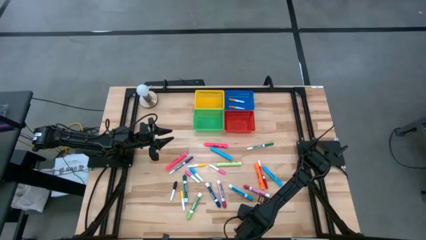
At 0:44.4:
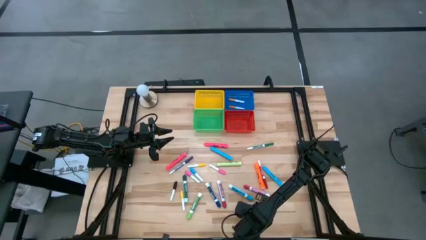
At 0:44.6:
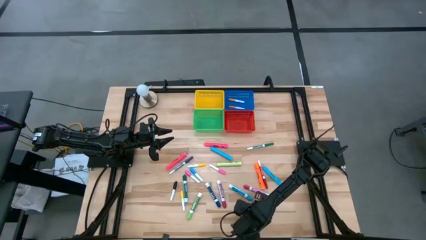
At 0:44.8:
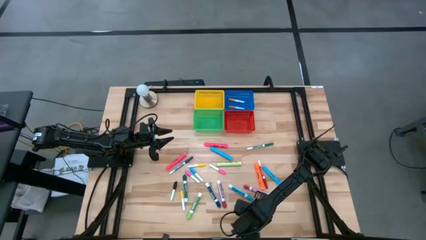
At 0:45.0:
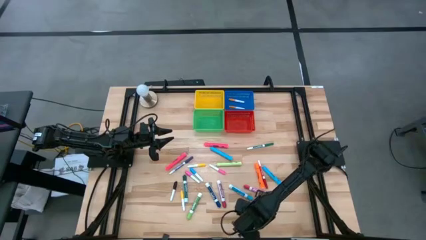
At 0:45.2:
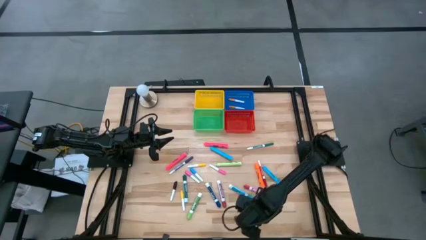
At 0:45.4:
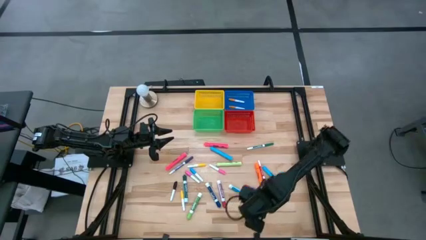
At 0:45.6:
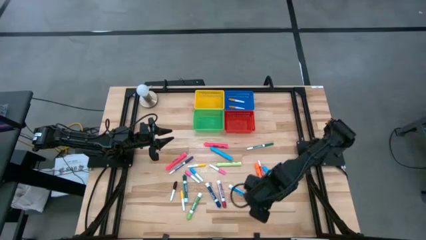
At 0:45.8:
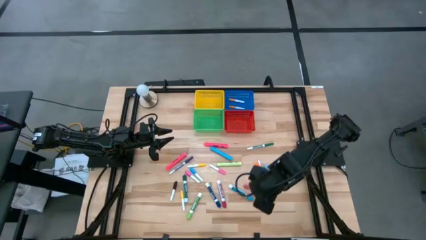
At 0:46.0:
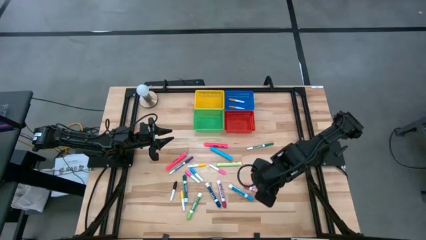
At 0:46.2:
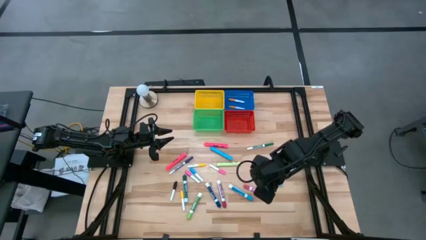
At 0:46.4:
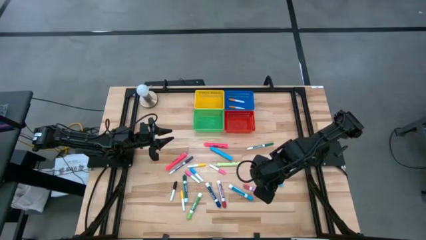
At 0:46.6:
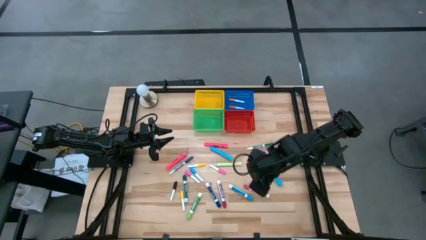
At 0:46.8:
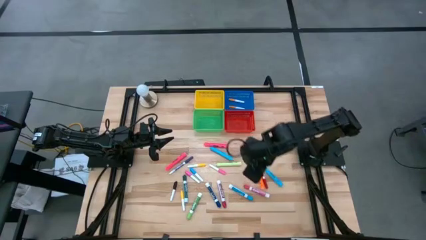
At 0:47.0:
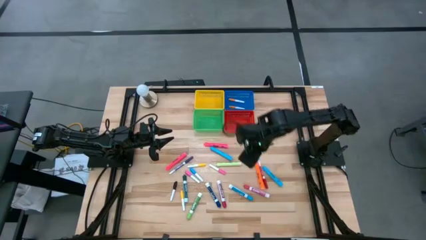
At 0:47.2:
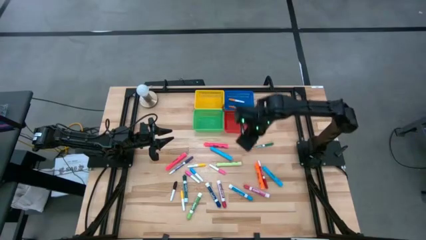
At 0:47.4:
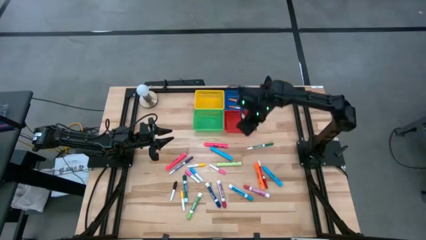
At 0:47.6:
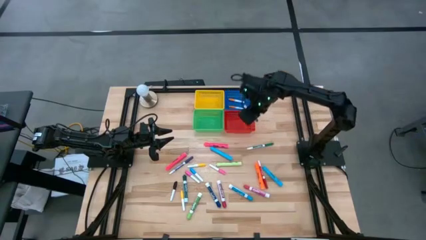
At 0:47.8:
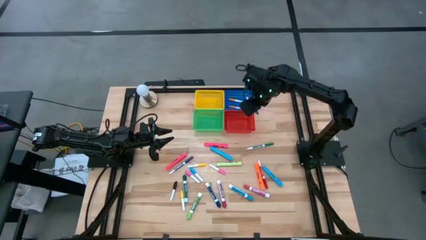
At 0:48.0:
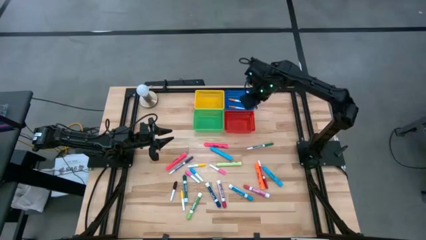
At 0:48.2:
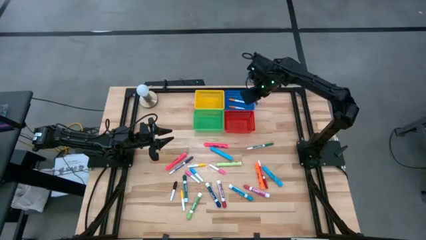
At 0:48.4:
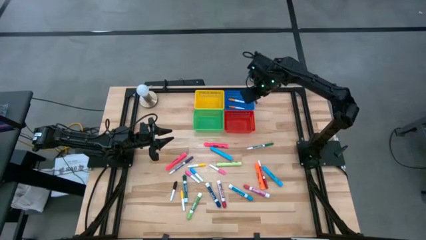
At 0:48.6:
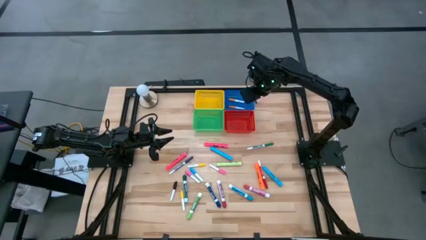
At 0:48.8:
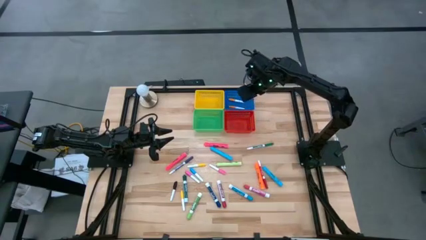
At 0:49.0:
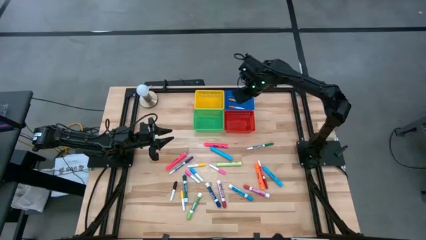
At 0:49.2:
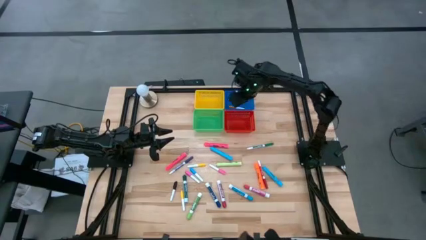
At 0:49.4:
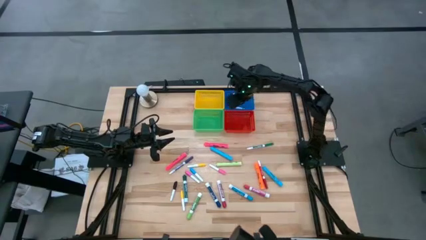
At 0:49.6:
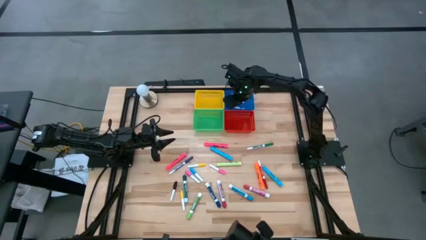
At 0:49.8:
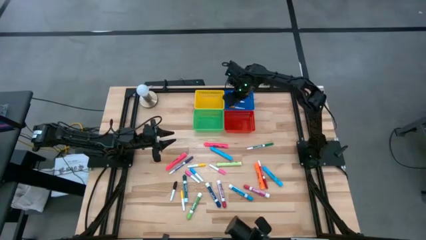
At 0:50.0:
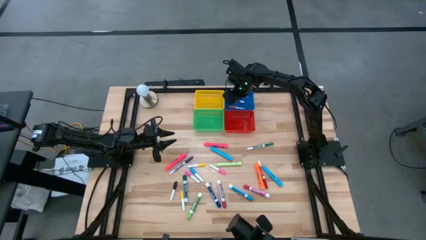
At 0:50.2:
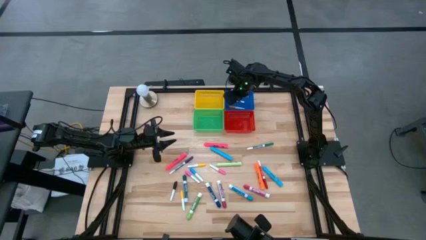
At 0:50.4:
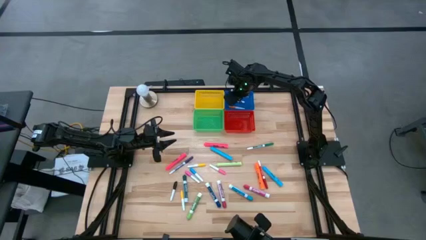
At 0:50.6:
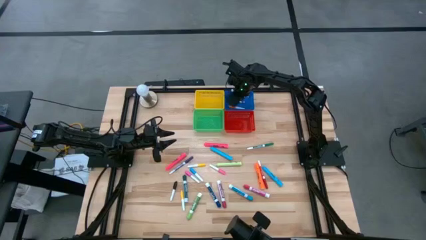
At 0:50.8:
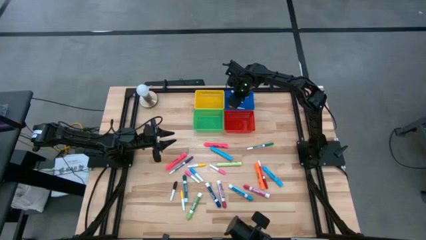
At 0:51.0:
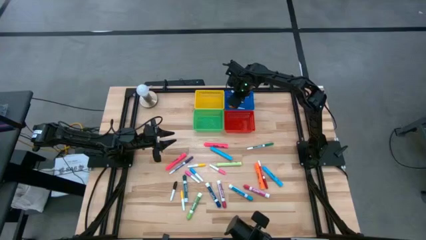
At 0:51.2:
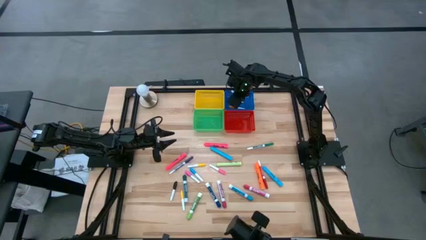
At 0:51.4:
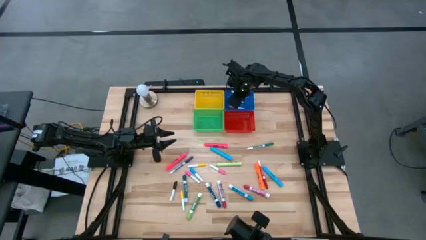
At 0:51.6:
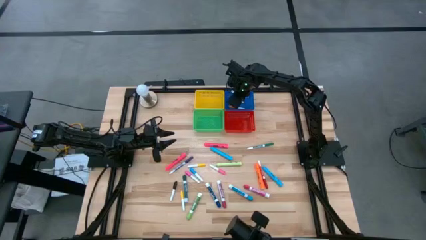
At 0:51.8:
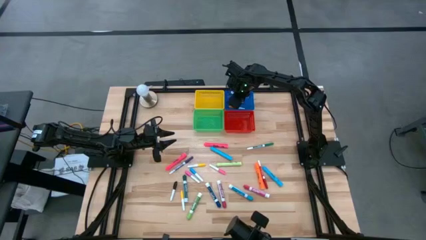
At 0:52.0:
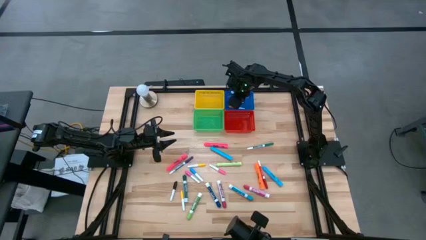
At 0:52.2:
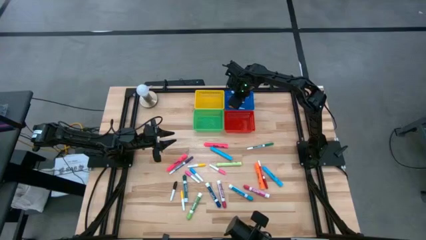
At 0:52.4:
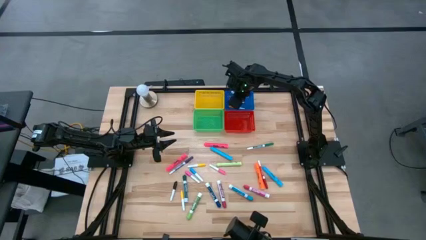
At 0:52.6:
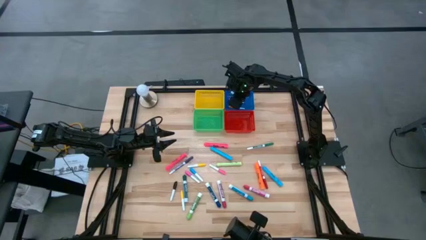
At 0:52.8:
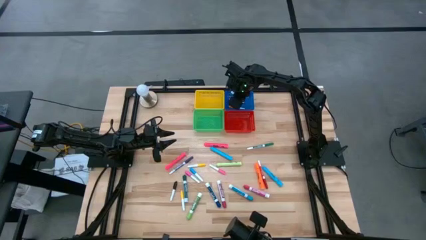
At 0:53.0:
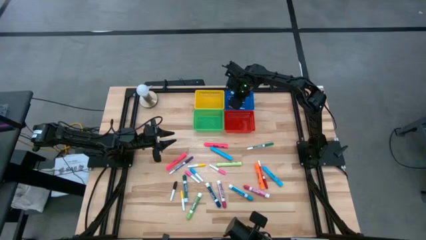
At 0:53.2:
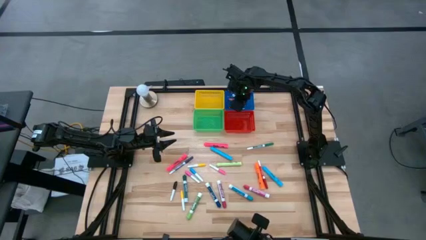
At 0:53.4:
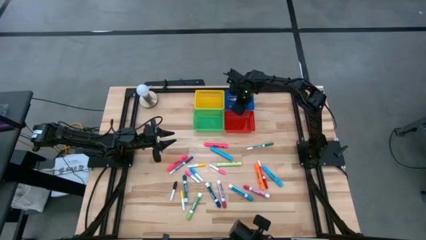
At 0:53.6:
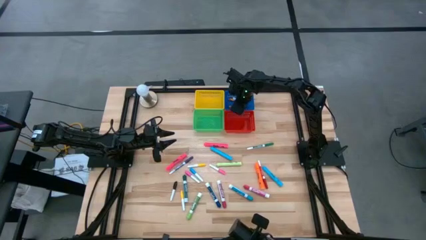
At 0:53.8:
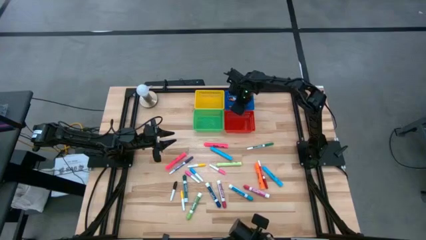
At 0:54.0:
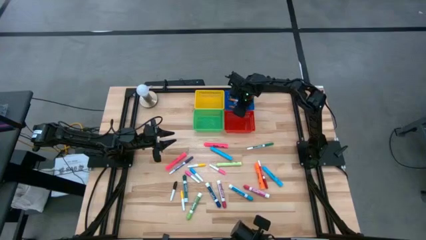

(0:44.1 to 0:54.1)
Task: Pick & Place Markers
Put the small violet highlighter pen into the blue bin
